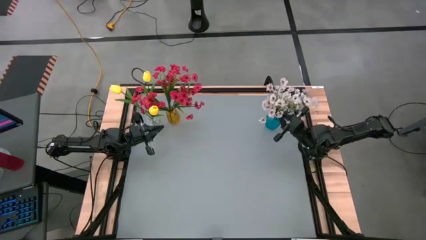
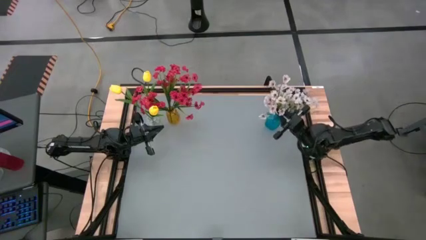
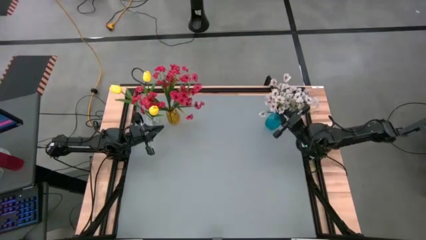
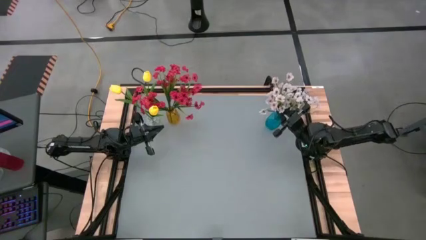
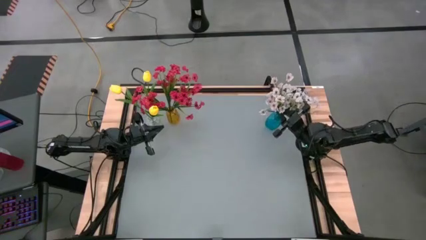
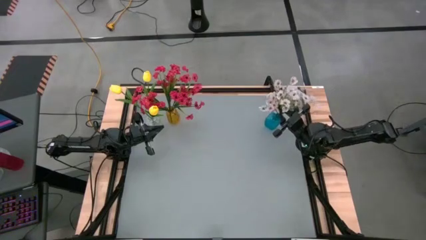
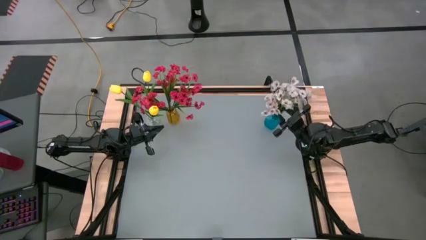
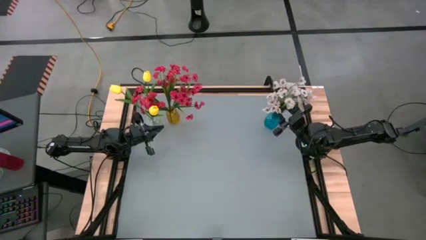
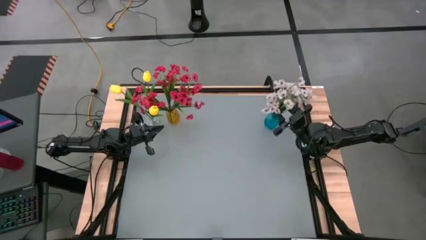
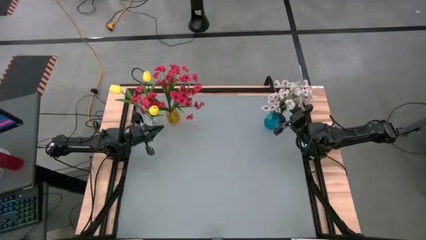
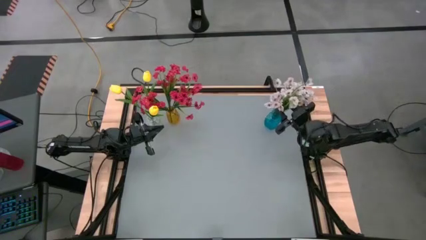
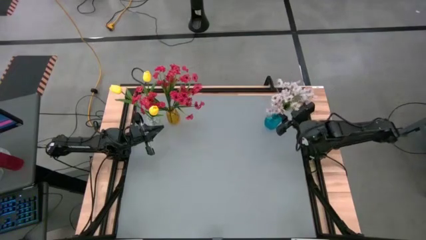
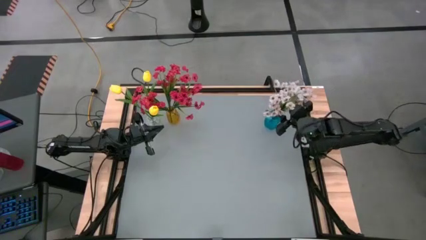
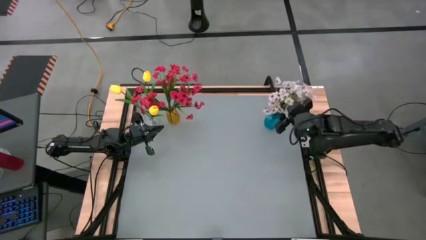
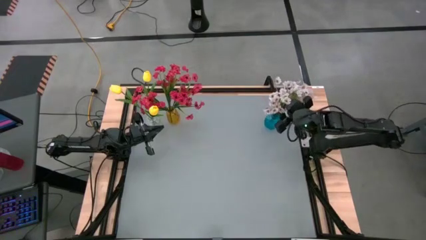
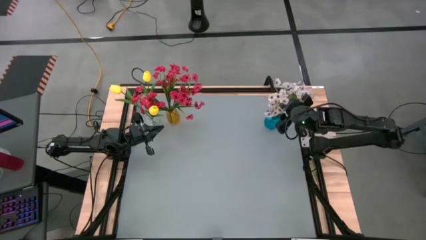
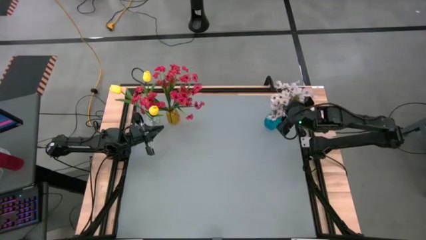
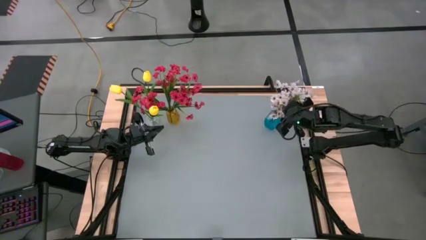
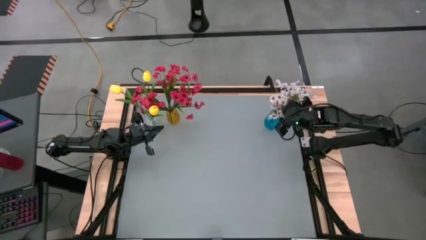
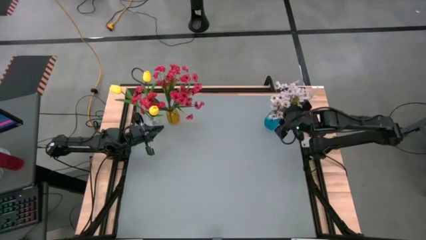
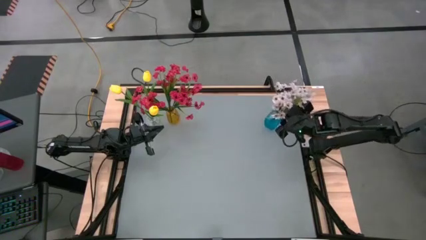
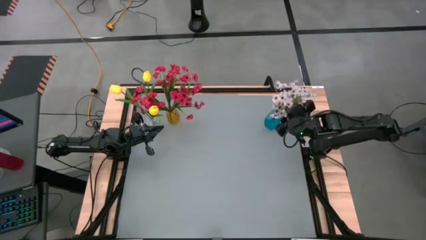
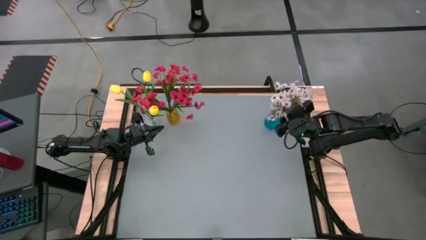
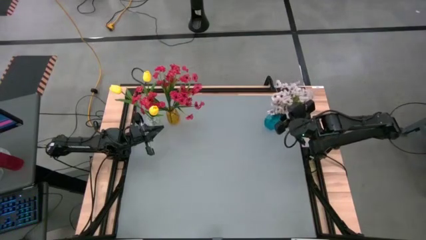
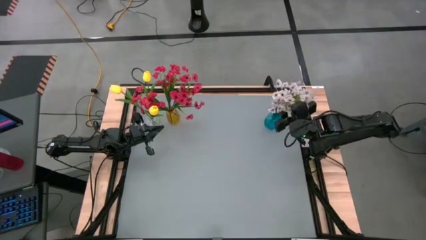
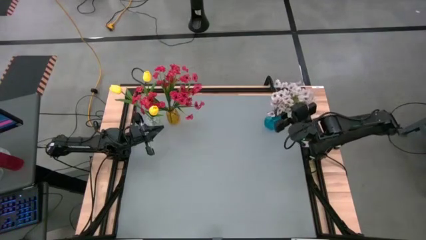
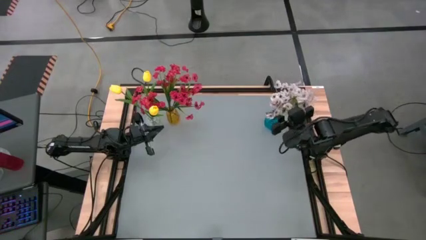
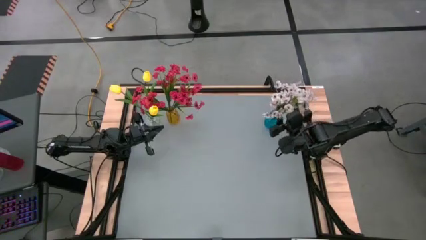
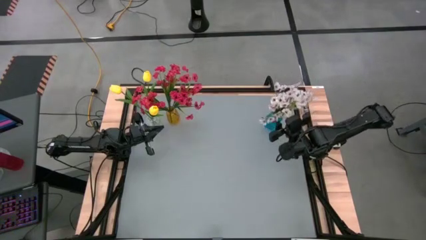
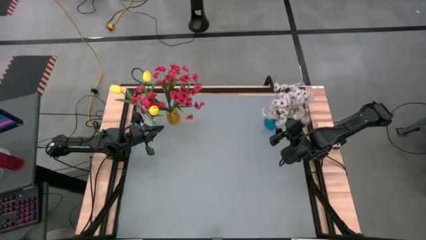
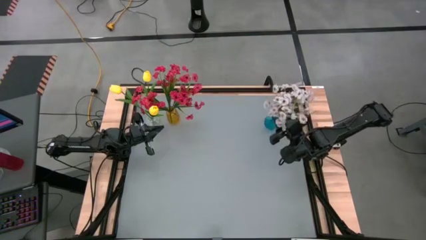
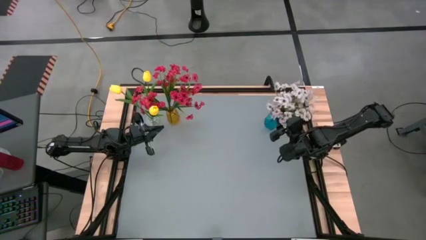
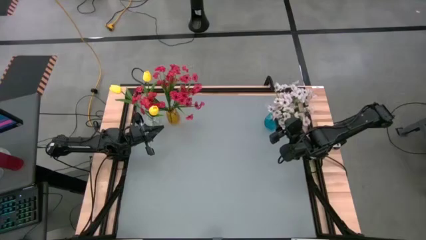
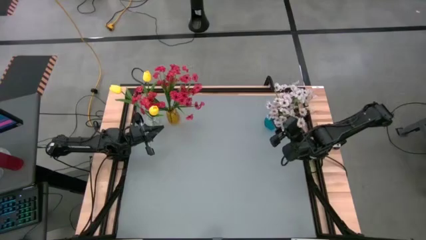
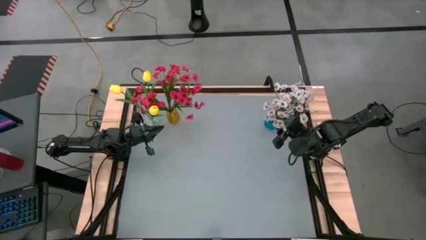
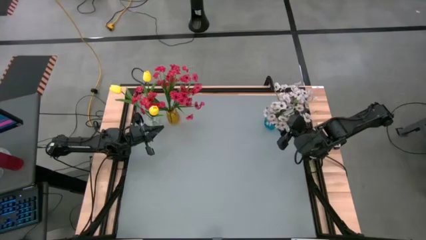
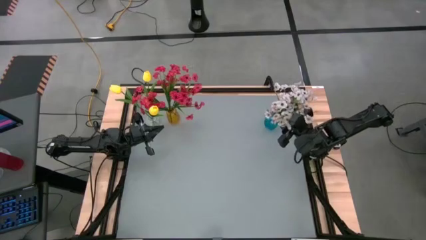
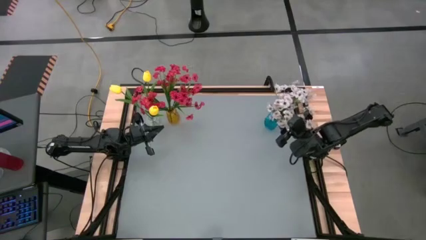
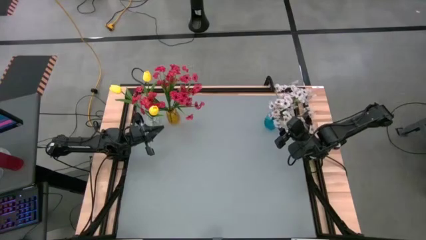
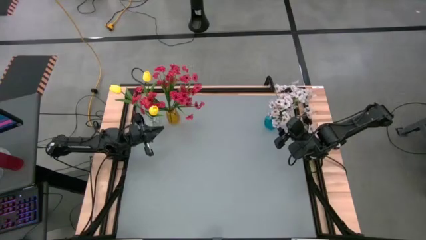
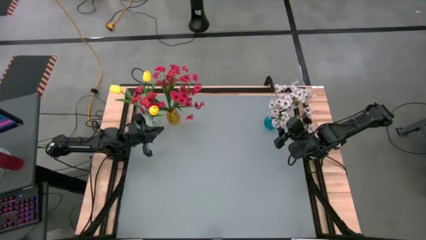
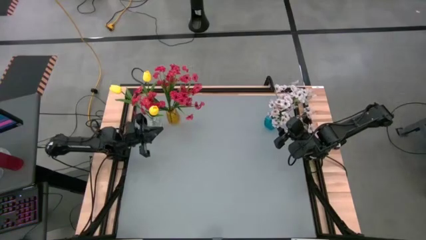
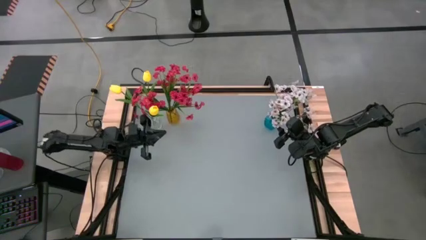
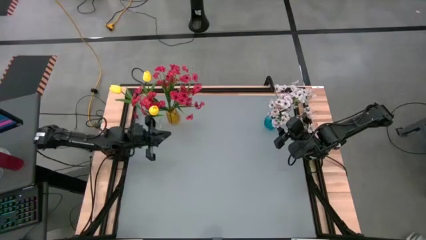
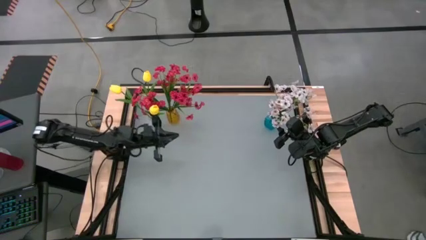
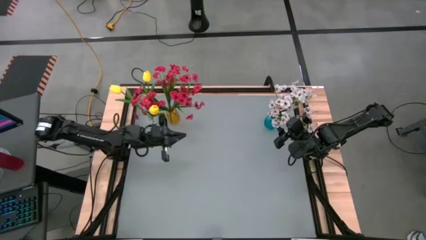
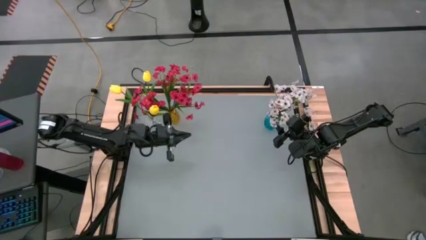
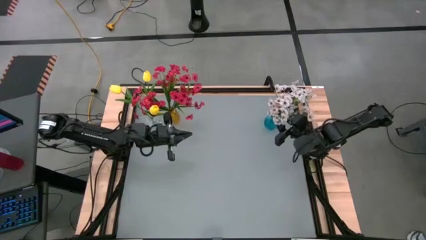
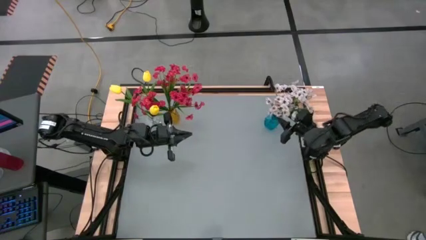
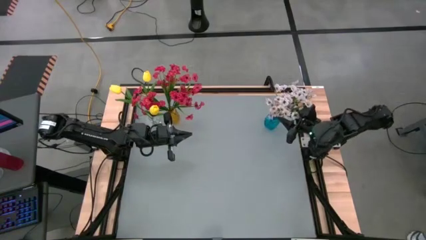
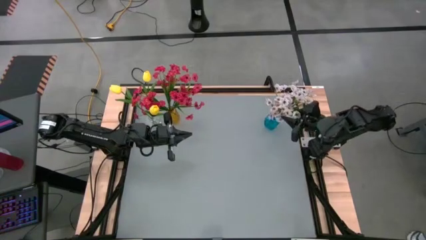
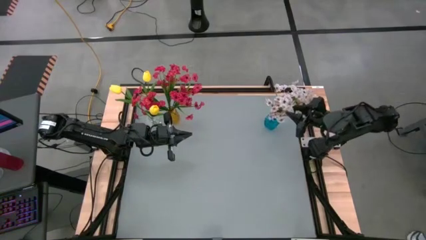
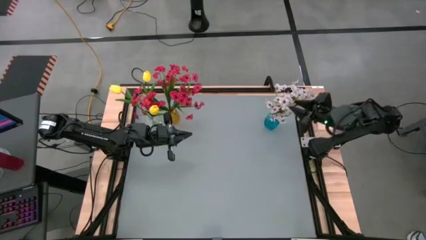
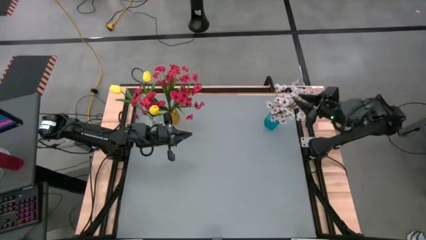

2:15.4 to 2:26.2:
Task: Sort flowers into vase by color
Put the white flowers into the blue vase

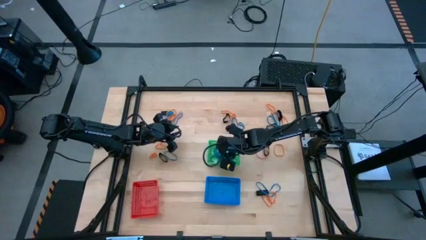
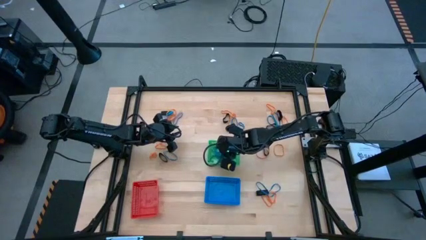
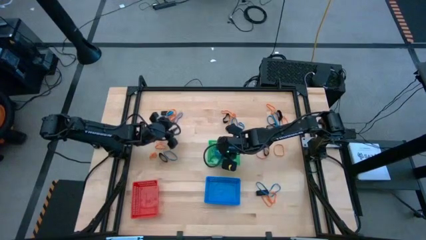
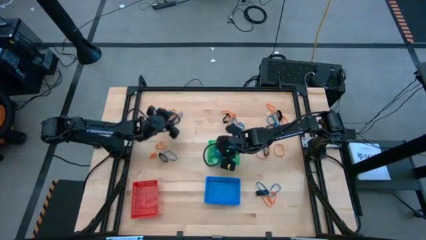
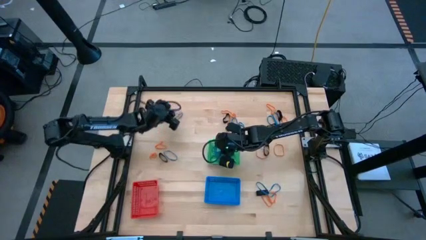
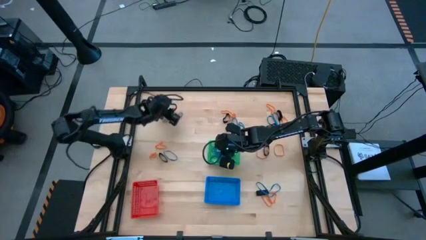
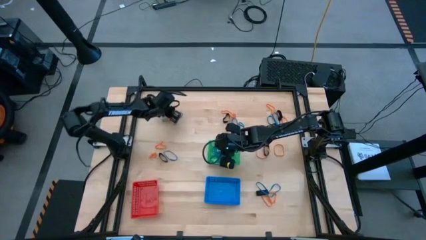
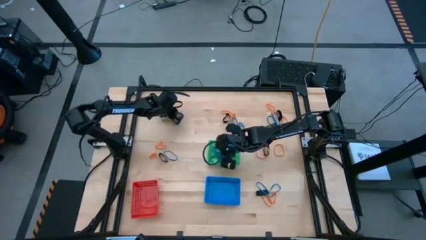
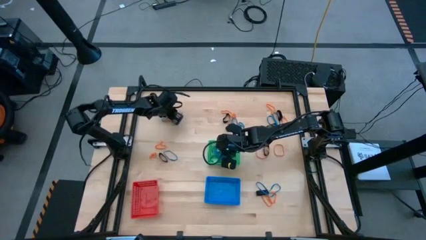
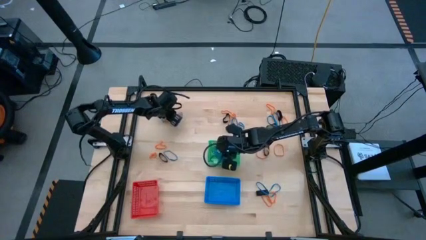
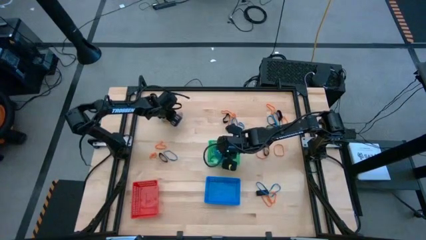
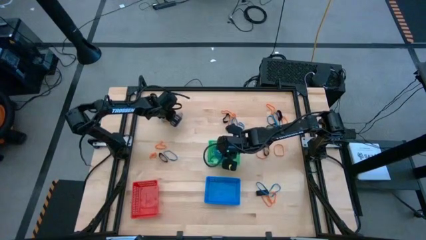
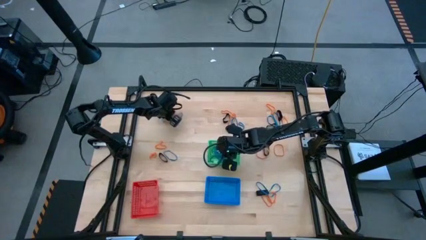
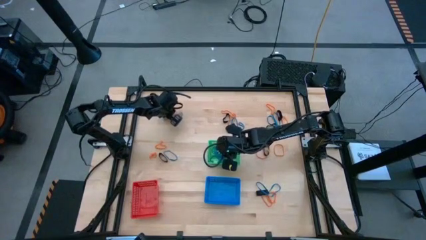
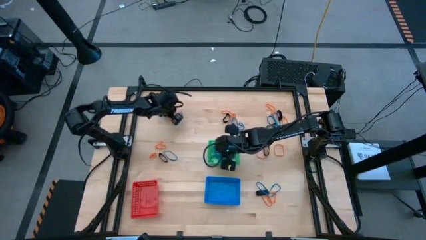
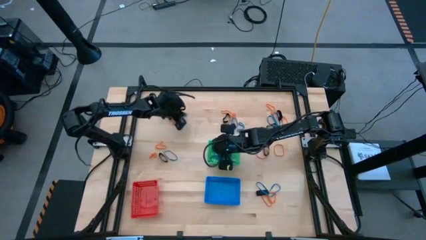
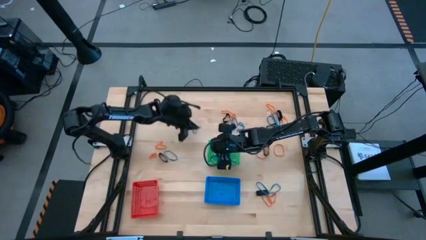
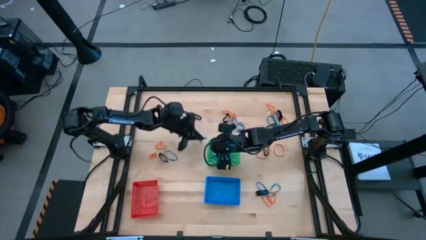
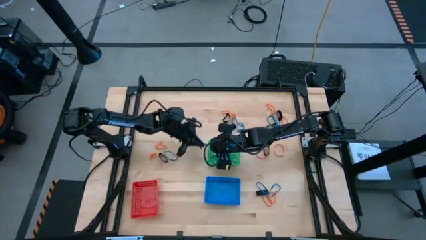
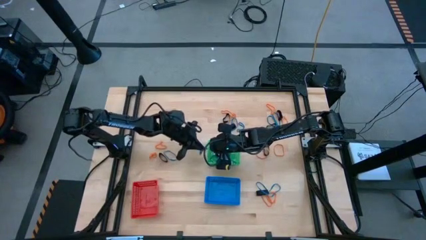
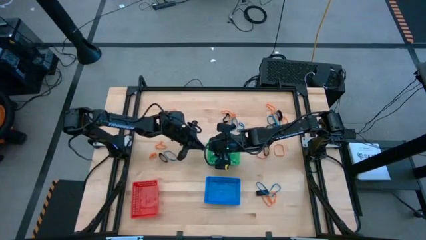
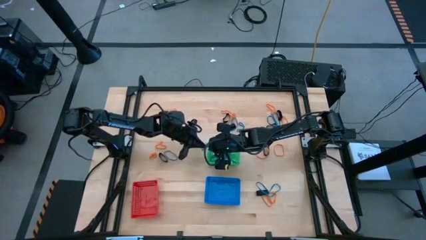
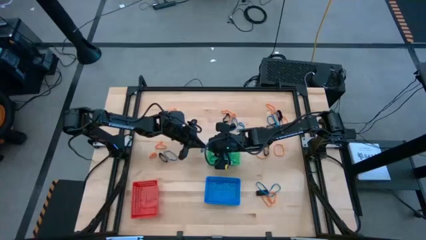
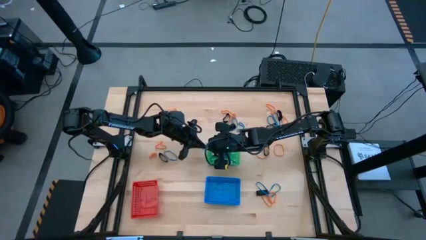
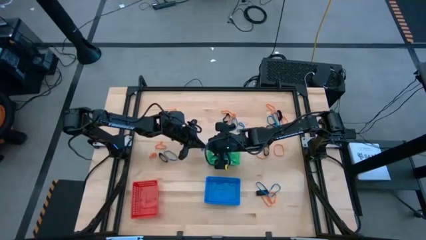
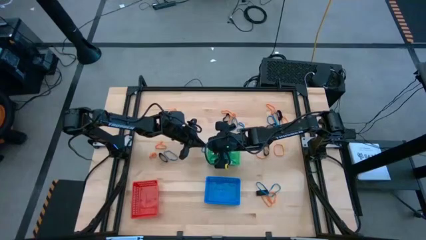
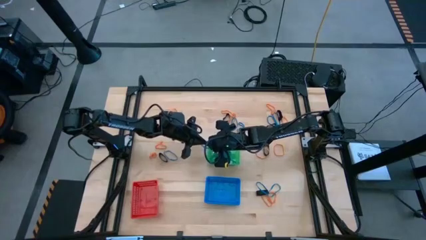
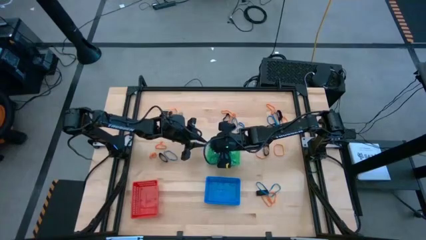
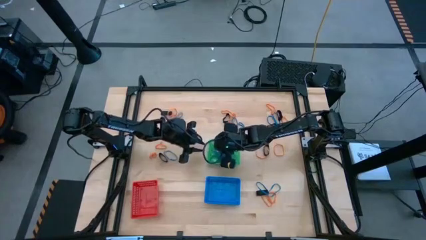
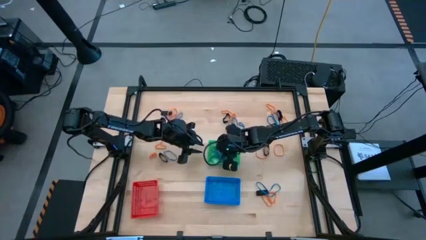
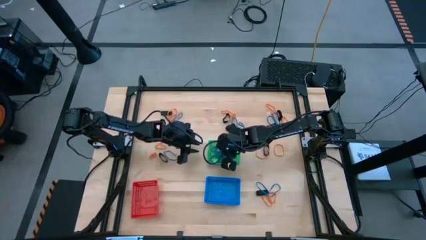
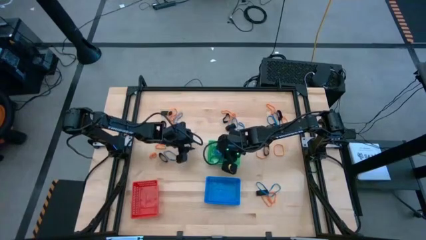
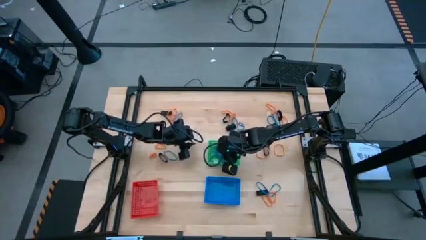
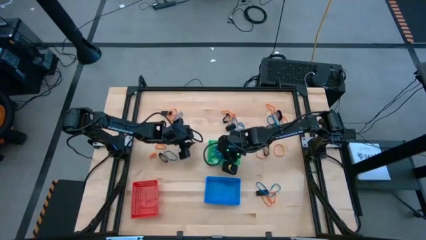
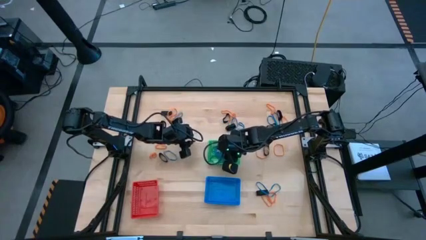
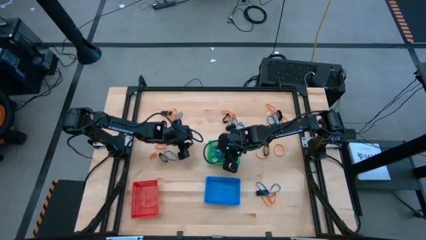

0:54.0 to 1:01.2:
Task: Sort rubber bands into baskets
Put the blue rubberband into the green bin
